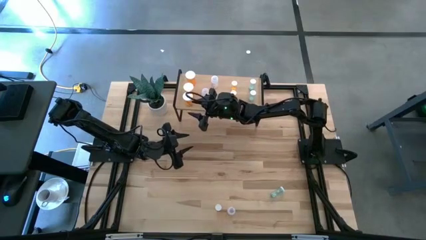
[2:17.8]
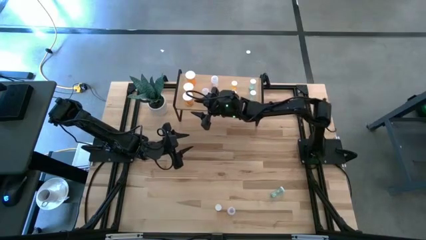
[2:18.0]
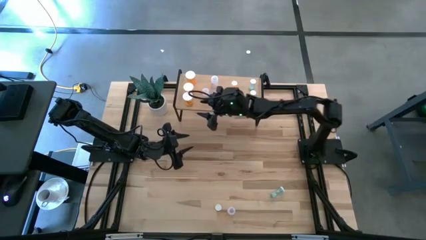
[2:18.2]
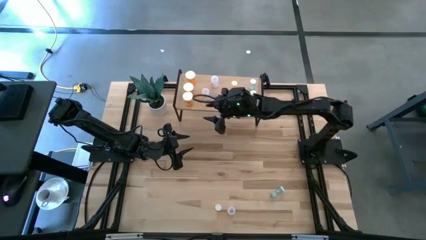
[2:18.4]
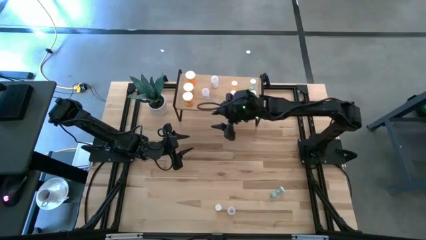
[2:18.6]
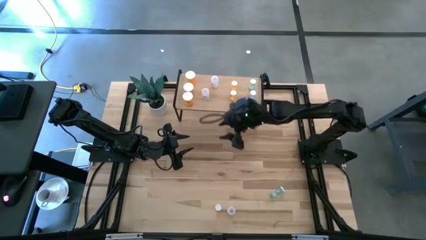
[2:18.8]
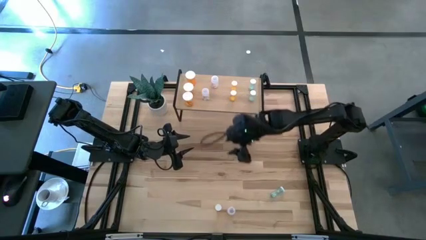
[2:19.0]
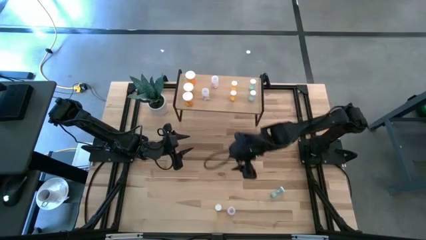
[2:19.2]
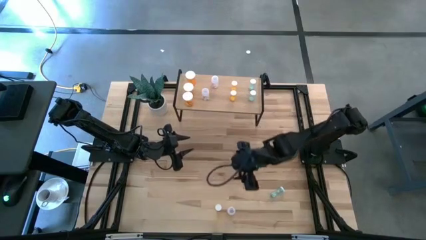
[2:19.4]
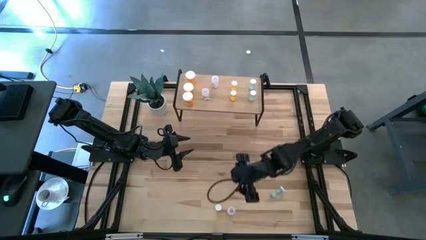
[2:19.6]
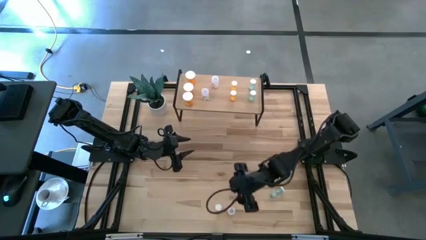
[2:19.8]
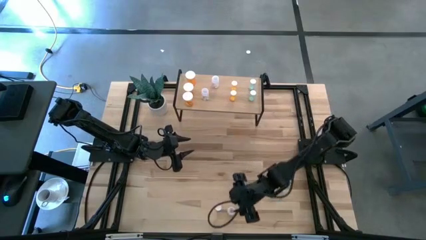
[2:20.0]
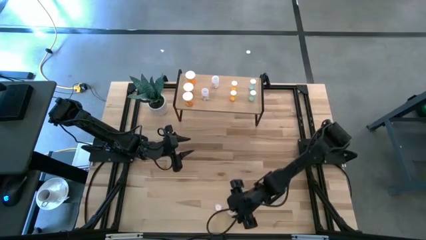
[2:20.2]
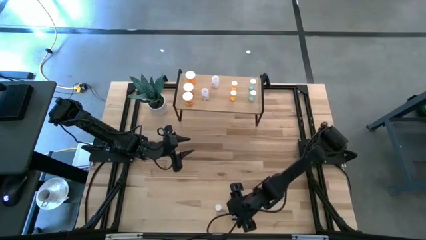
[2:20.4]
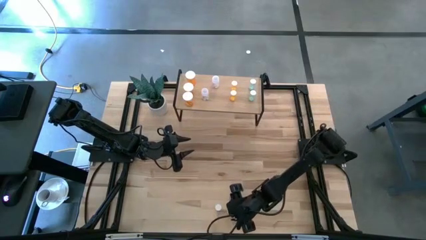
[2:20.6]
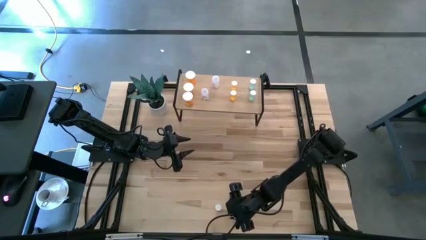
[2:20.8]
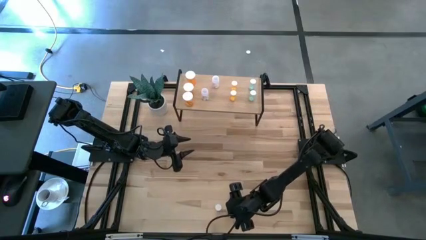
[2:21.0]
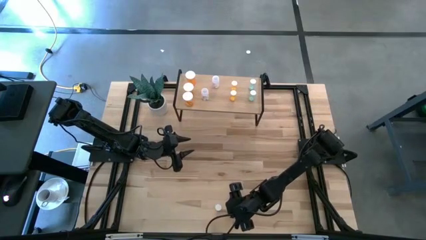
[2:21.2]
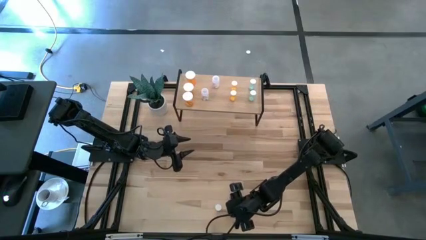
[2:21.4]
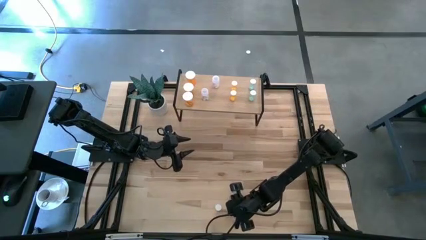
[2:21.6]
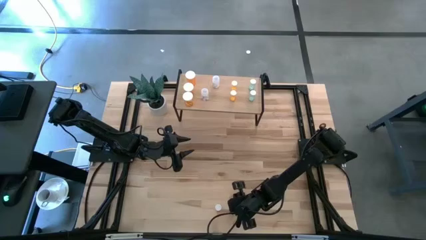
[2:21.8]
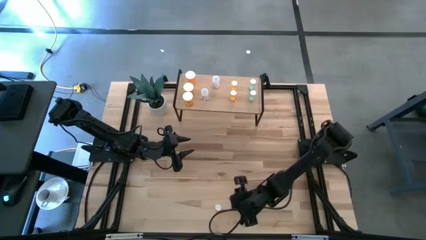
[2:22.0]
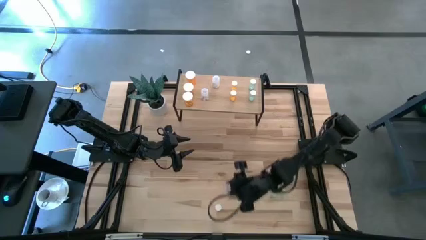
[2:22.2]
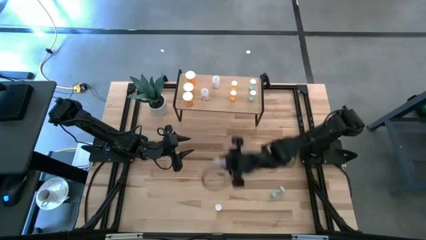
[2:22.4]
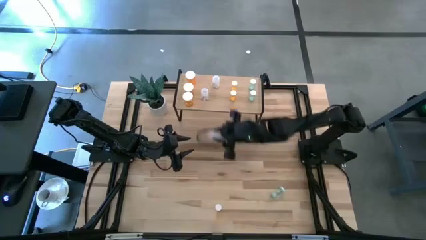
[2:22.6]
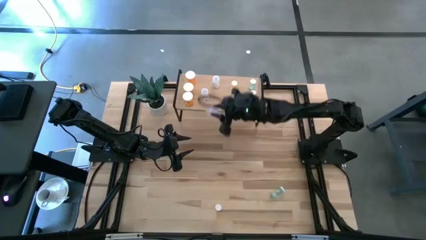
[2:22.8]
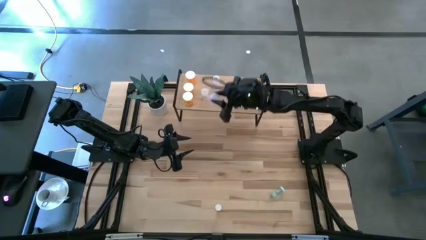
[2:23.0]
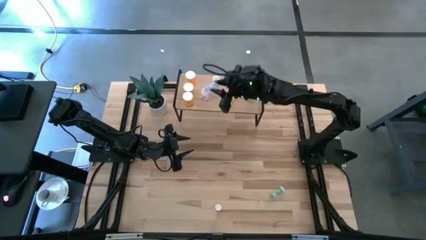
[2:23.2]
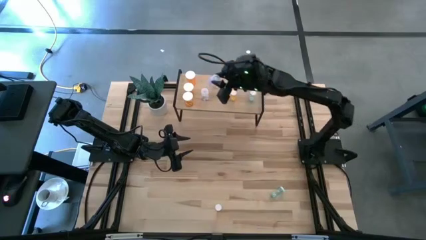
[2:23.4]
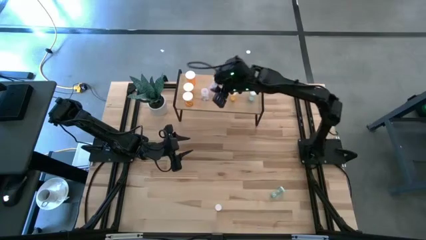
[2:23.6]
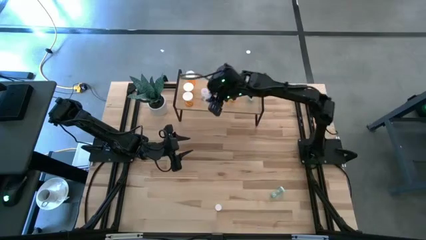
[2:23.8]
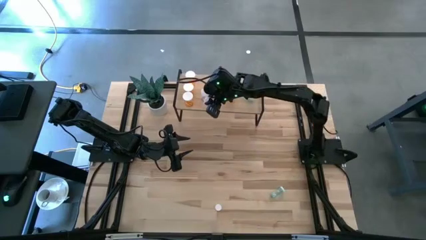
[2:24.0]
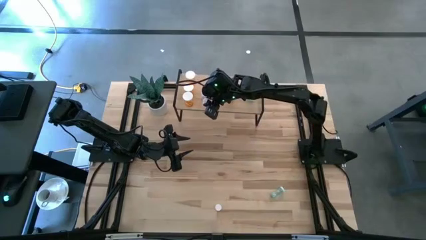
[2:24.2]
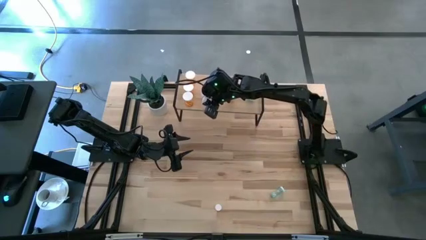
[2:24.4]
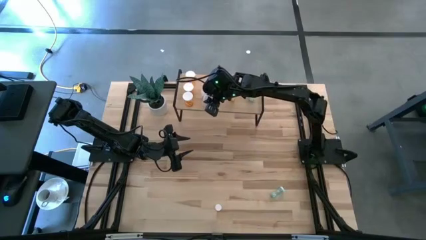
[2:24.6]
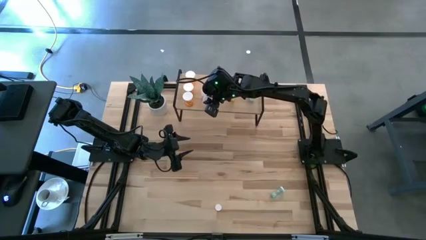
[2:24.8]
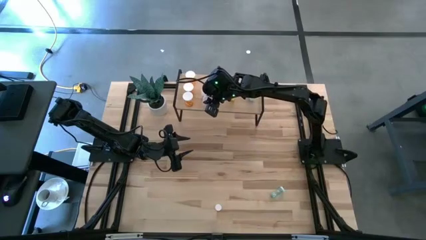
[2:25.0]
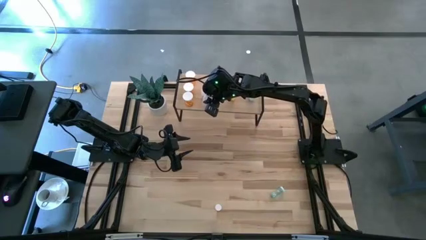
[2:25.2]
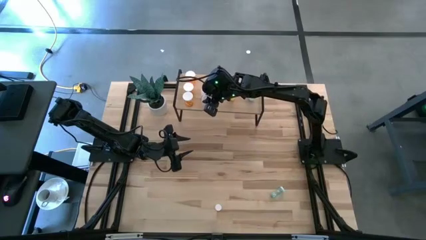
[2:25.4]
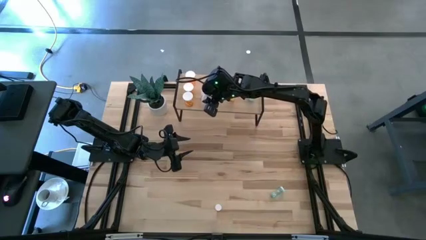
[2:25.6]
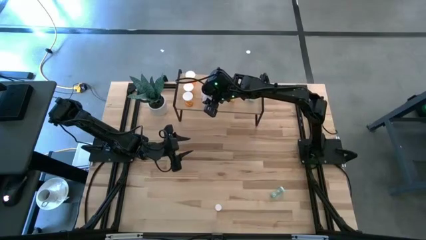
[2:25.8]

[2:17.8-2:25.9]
Task: Pick and place medicine bottles onto shelf by color
Put the transparent pill bottle aligned with the other transparent pill bottles on the shelf

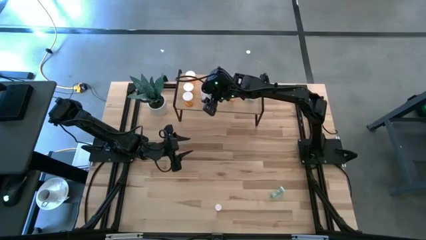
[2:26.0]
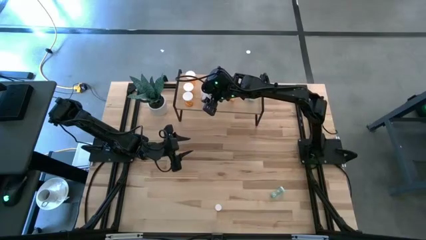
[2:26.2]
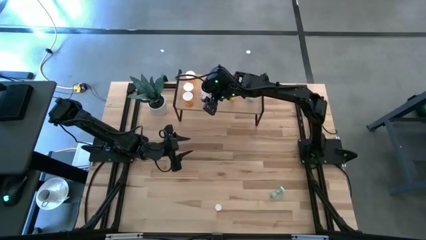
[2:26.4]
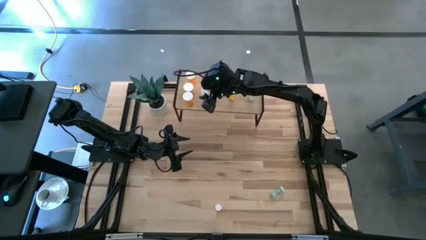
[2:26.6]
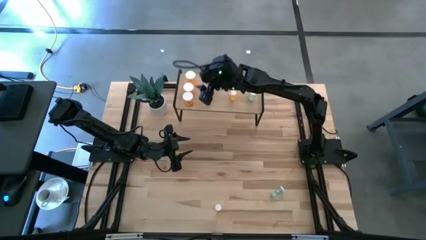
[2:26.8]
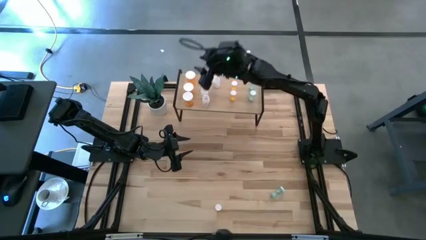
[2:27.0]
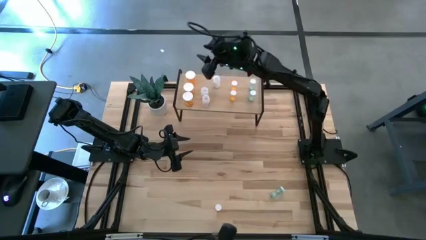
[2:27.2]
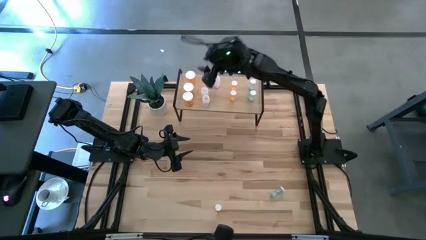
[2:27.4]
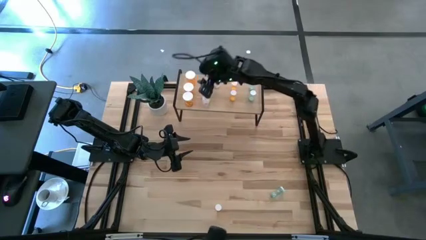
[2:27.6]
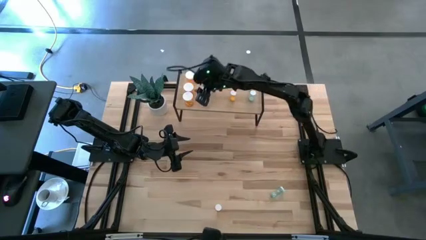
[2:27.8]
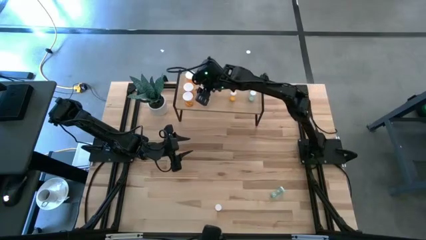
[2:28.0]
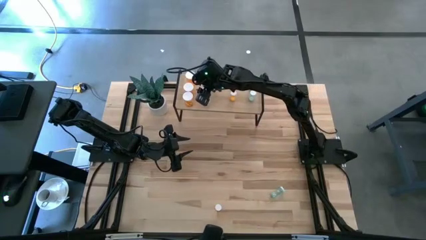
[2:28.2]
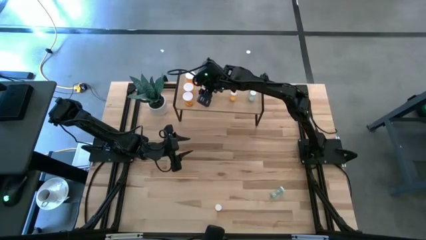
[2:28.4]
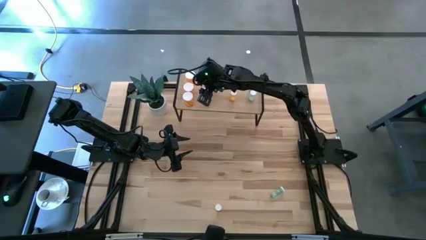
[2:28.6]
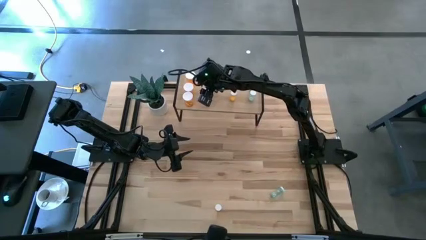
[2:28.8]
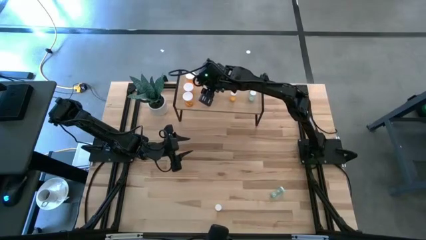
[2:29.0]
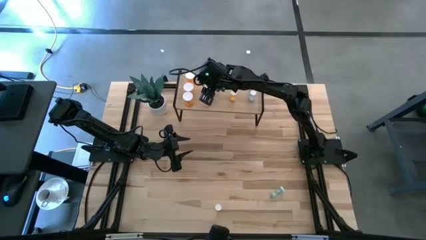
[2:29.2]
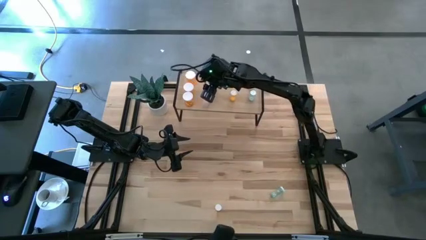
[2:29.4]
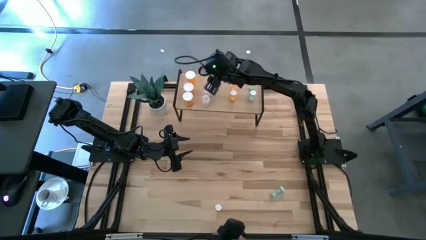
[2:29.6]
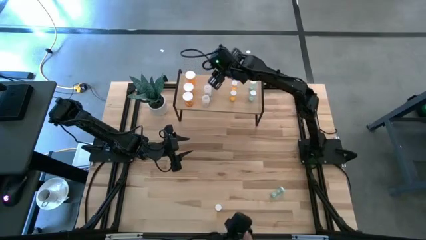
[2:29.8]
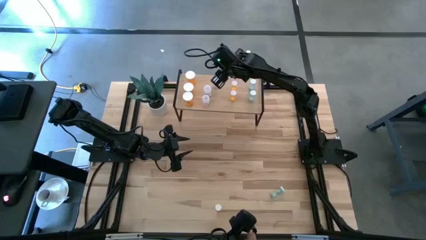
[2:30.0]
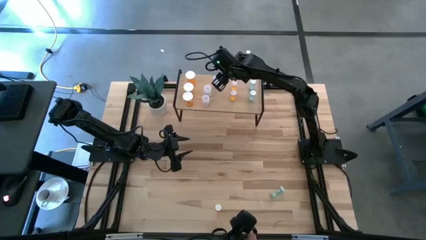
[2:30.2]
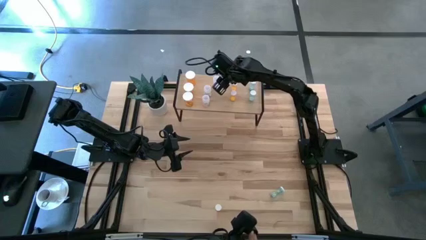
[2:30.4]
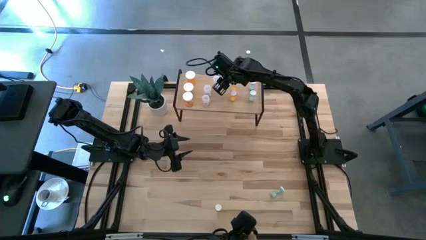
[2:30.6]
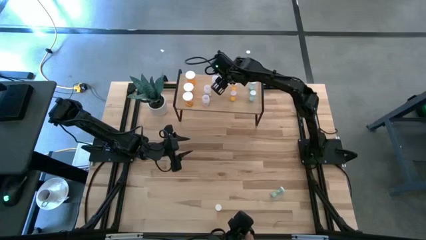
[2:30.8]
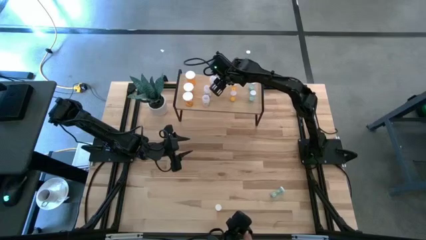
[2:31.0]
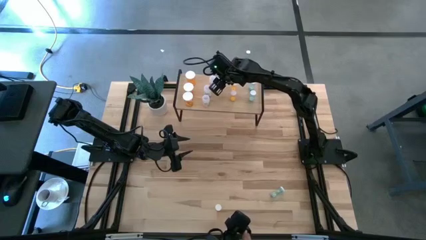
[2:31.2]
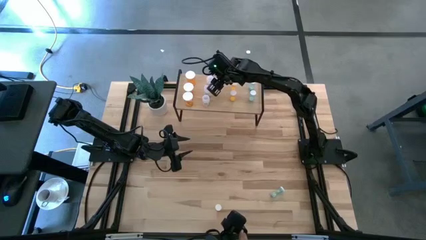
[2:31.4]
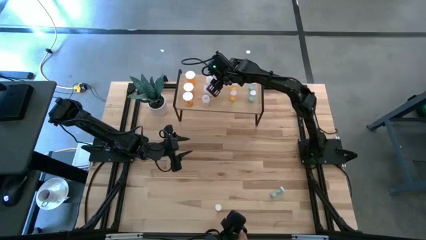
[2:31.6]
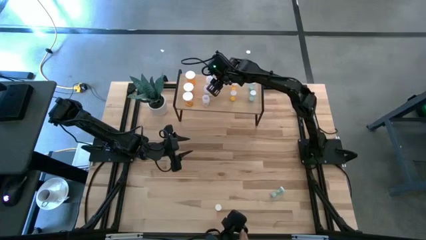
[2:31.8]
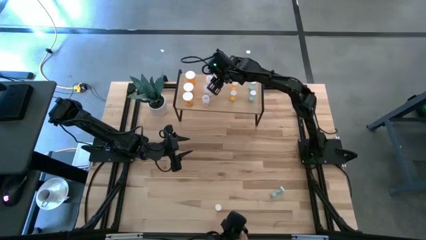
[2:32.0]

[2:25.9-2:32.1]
Adjust the transparent pill bottles on the shelf
